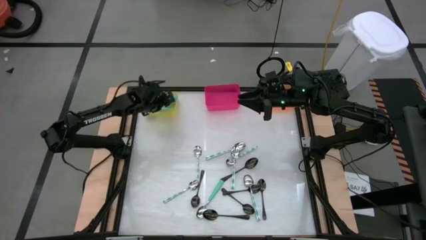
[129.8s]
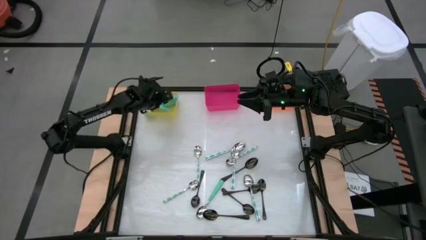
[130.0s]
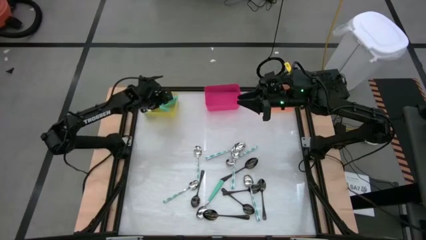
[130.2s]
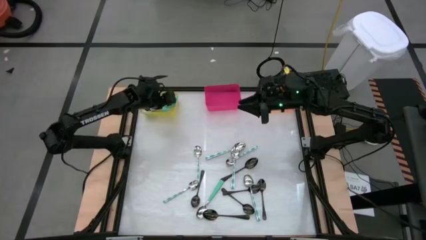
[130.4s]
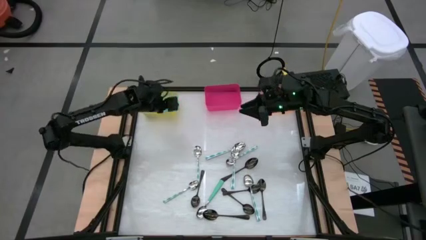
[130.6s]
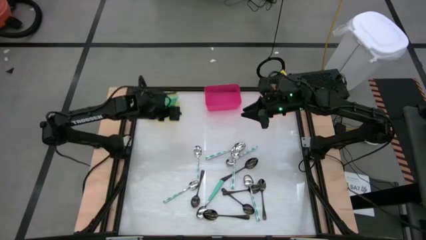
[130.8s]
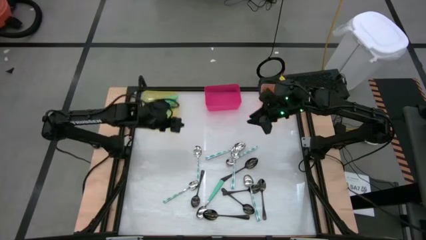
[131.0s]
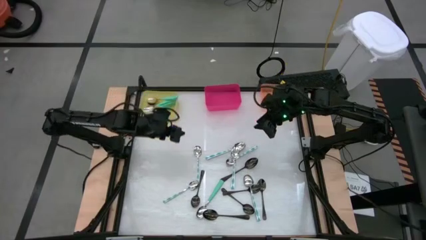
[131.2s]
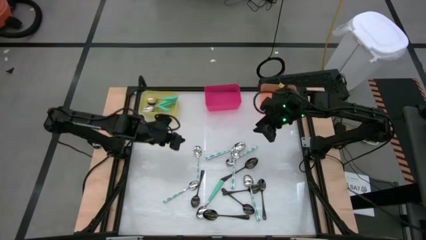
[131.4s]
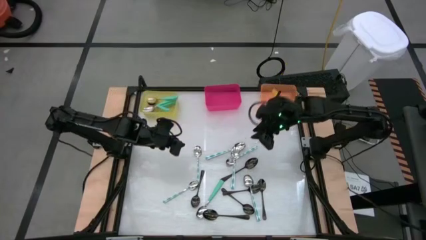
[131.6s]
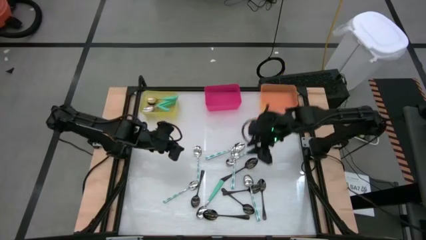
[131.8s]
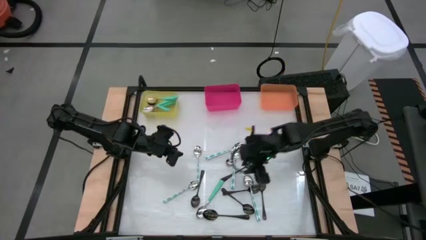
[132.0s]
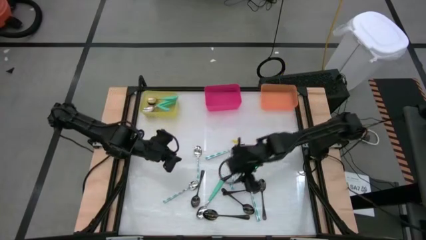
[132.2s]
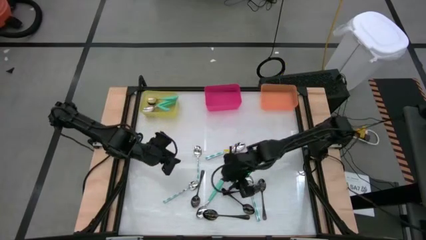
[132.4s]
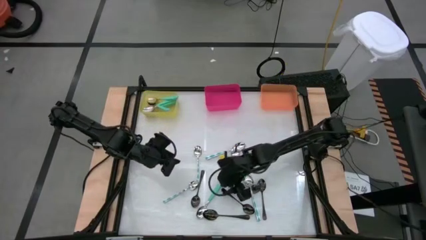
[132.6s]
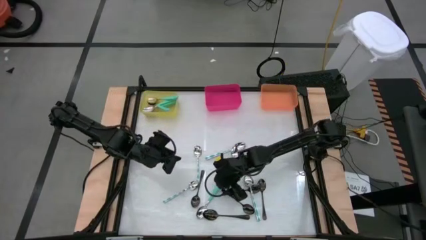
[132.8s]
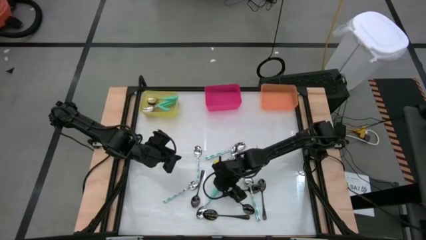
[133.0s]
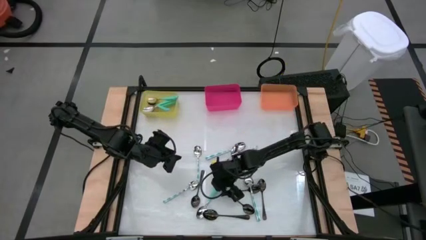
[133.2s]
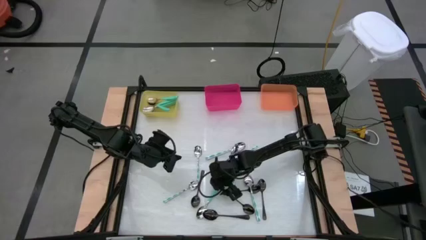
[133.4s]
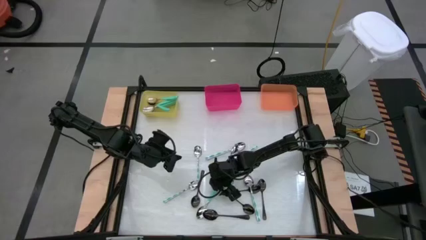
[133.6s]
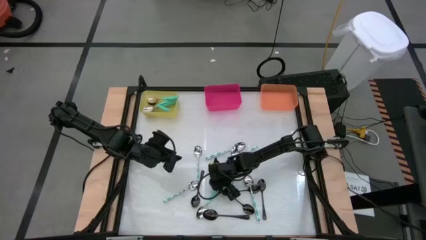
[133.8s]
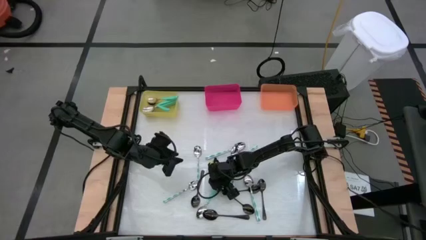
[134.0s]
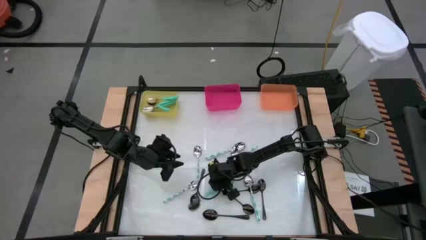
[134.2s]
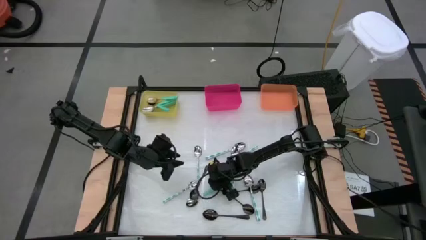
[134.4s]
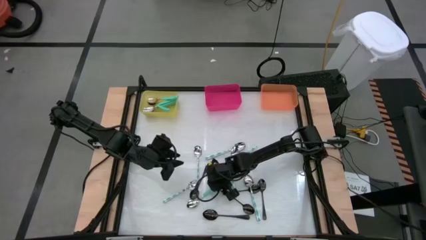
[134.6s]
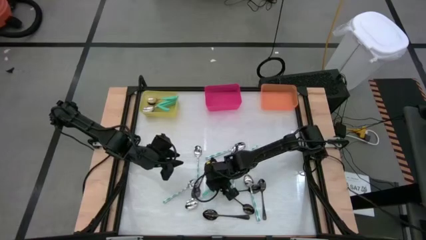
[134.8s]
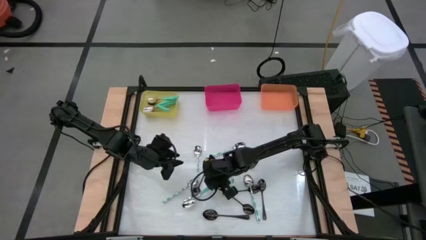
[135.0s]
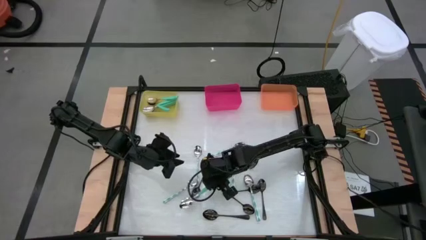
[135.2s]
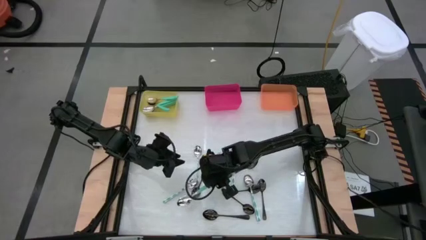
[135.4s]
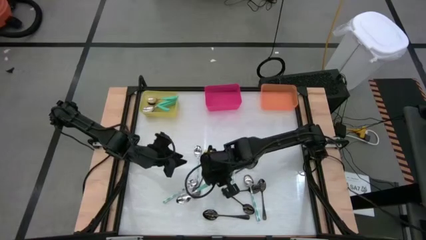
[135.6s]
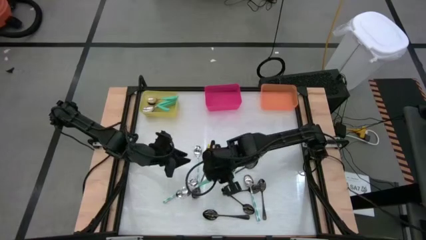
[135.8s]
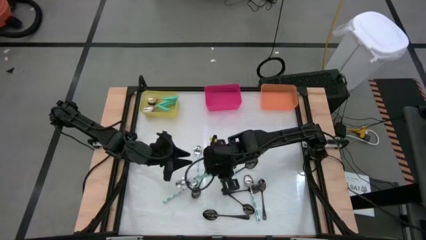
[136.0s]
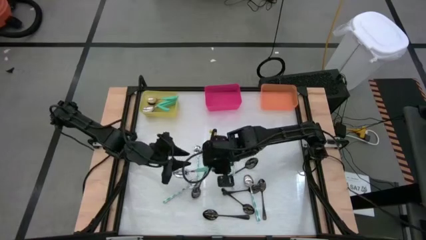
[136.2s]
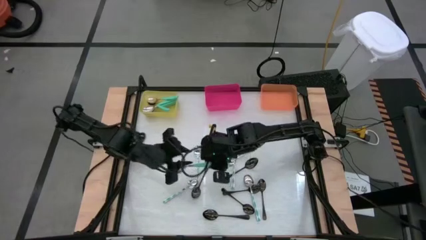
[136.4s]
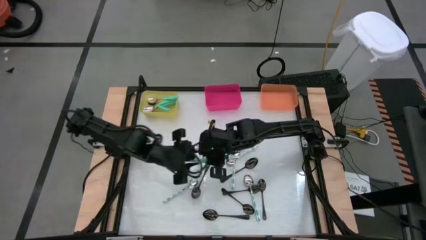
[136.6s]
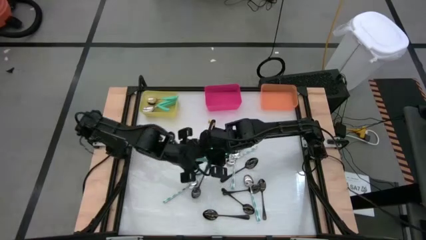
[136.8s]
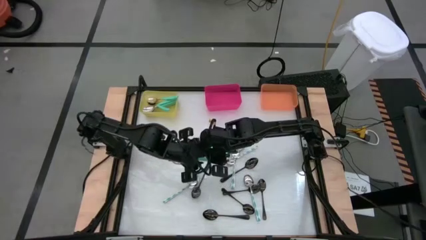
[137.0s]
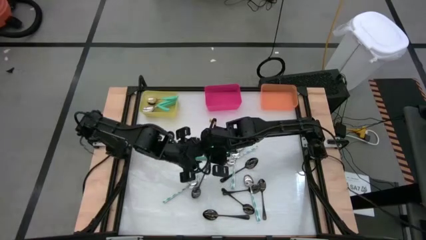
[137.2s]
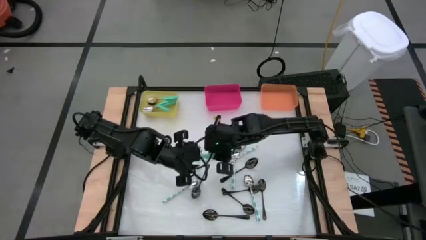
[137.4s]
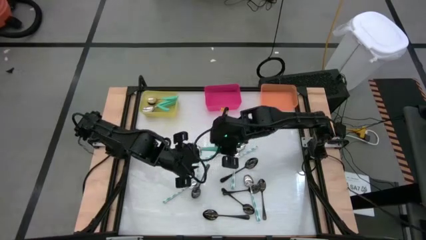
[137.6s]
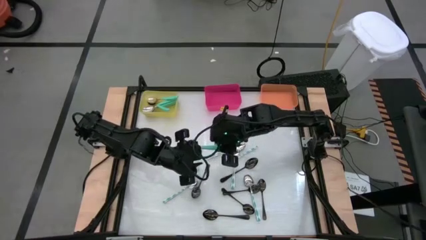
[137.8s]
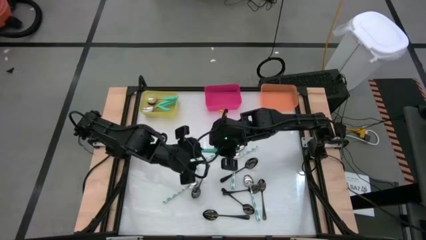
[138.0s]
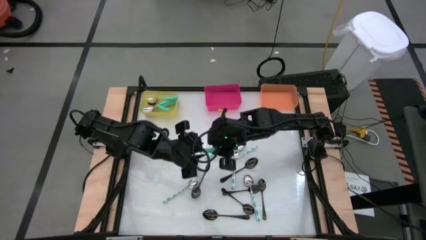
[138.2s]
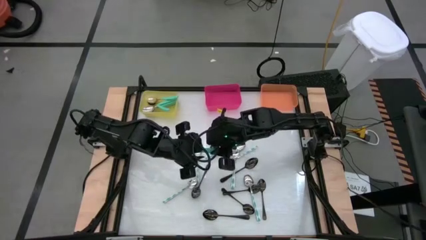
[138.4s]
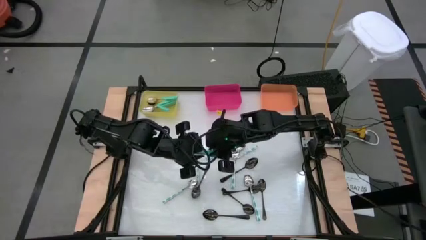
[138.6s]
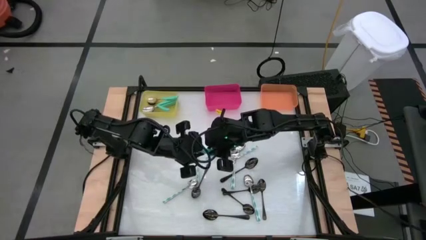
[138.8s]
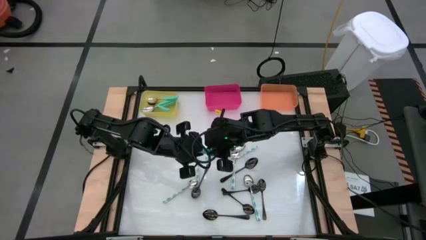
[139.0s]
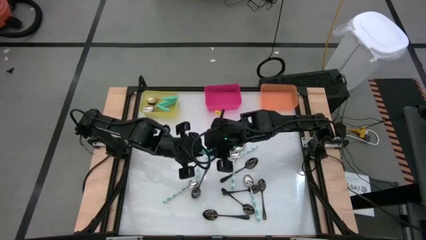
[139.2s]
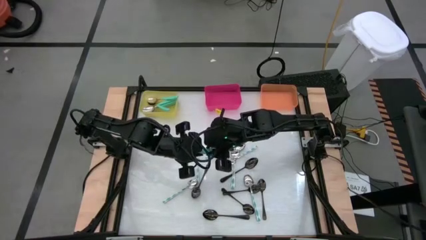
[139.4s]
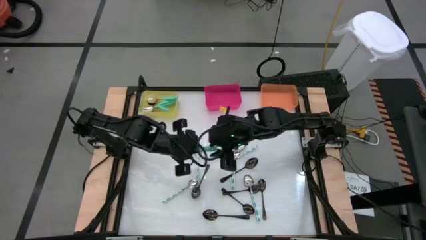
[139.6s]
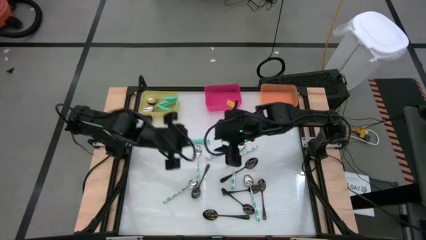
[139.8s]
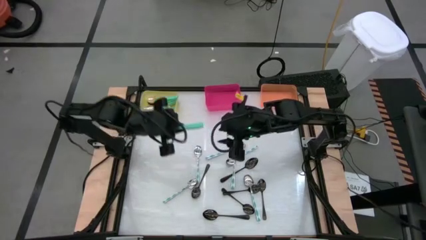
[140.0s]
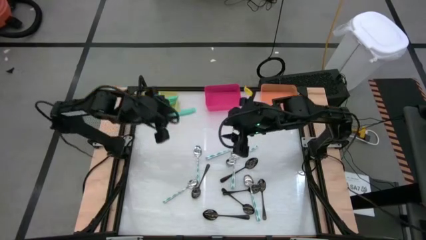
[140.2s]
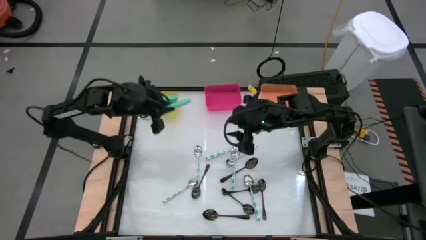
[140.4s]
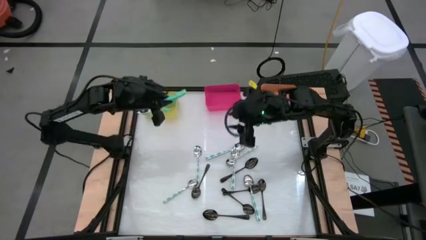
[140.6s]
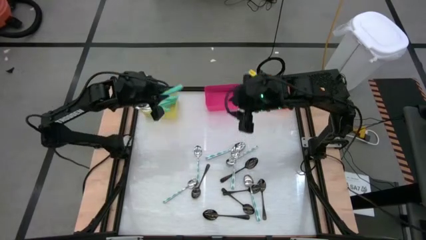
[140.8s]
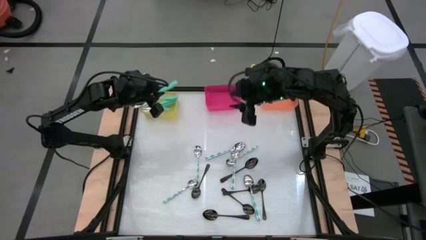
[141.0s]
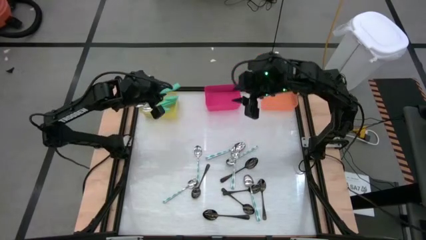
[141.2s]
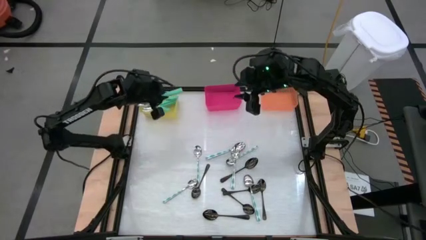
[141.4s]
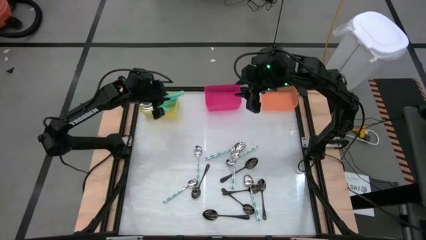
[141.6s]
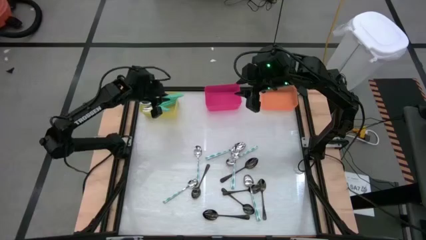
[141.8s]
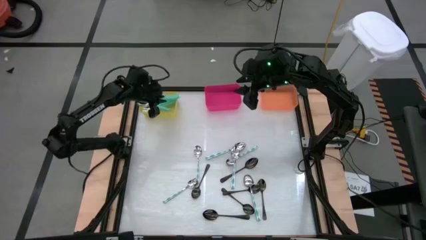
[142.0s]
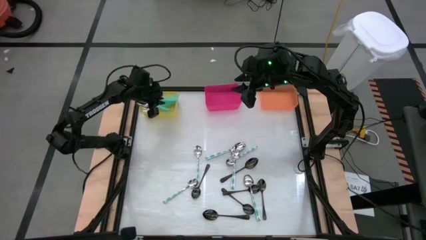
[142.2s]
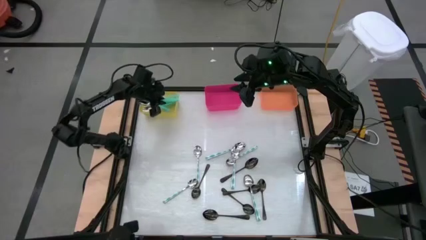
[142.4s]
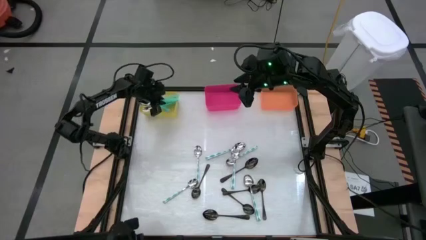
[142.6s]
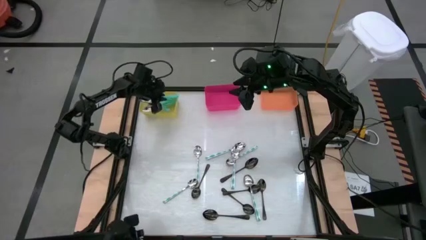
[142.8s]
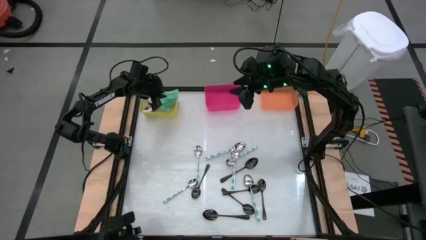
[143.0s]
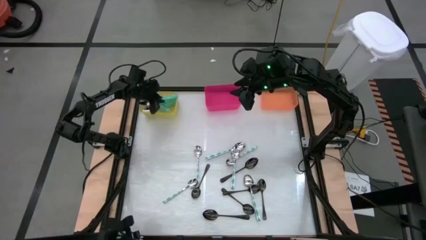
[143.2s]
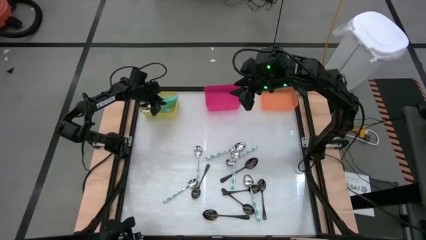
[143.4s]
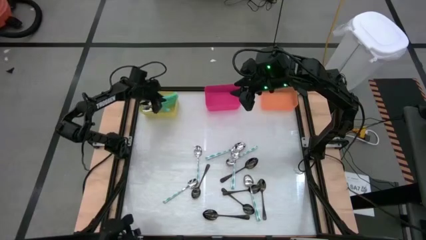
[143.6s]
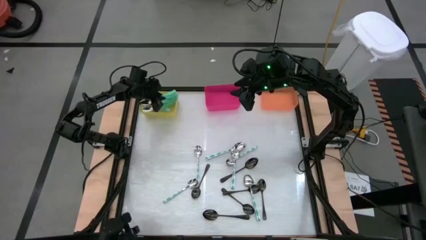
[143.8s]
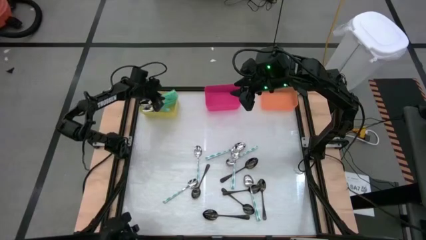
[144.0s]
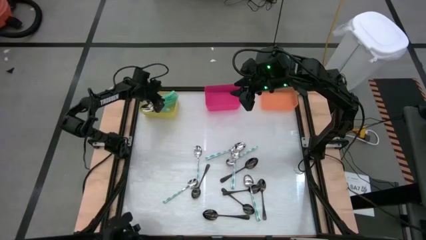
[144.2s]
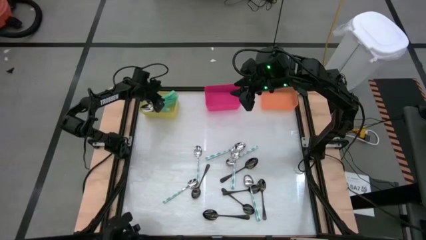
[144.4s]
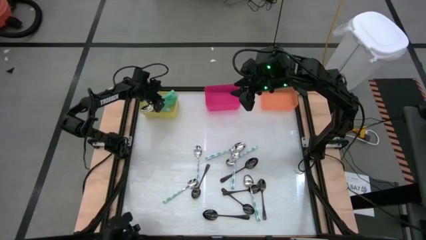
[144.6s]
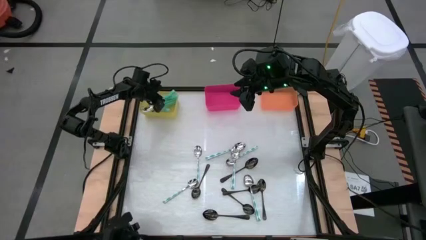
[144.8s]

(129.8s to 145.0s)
Task: Sort silverware by color (type)
Put the light green spoon into the yellow bin
